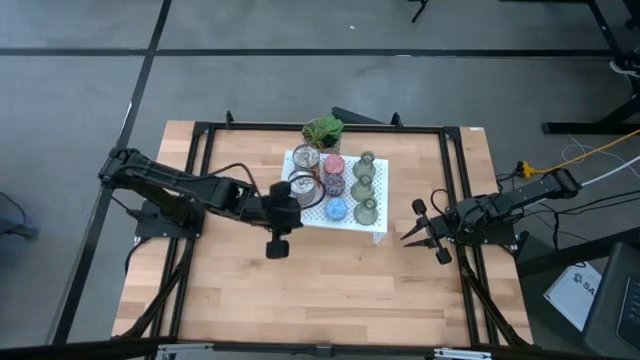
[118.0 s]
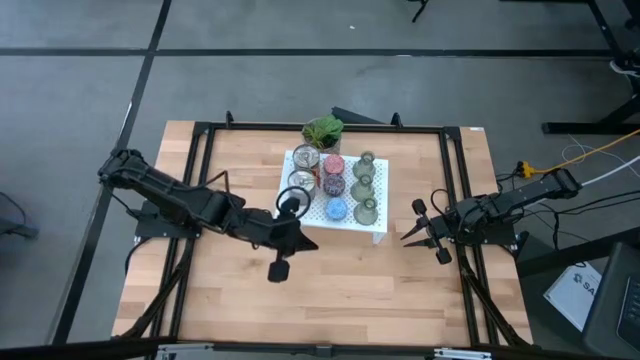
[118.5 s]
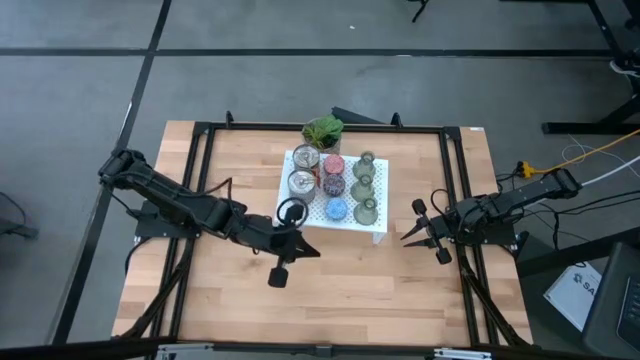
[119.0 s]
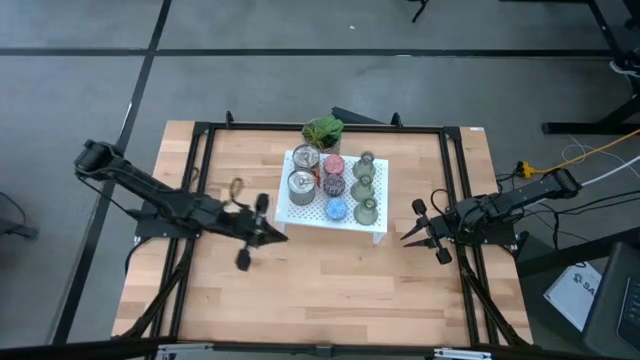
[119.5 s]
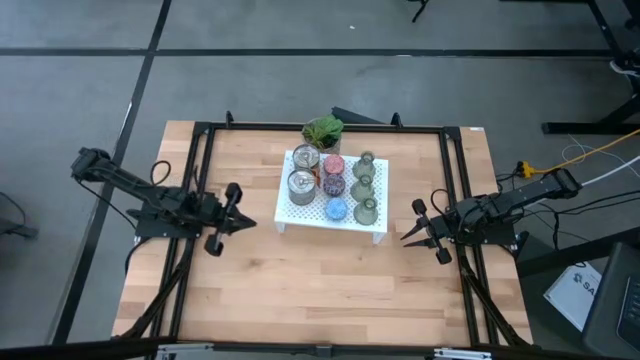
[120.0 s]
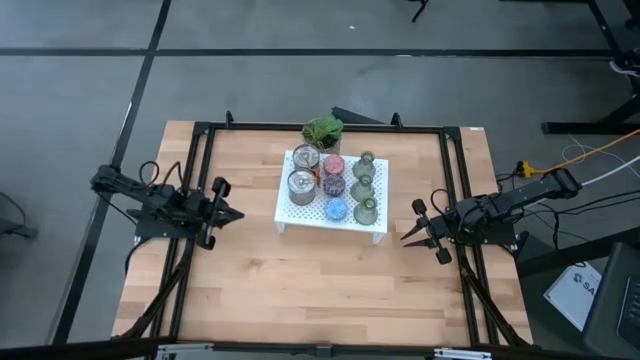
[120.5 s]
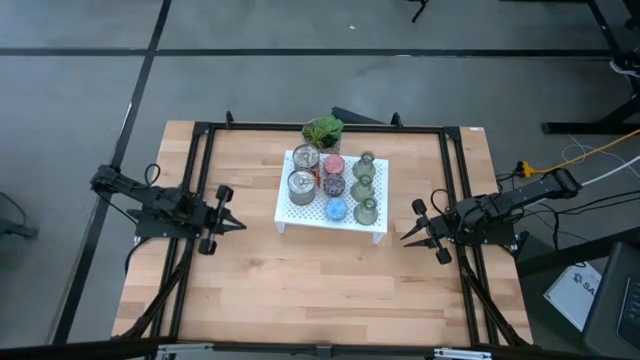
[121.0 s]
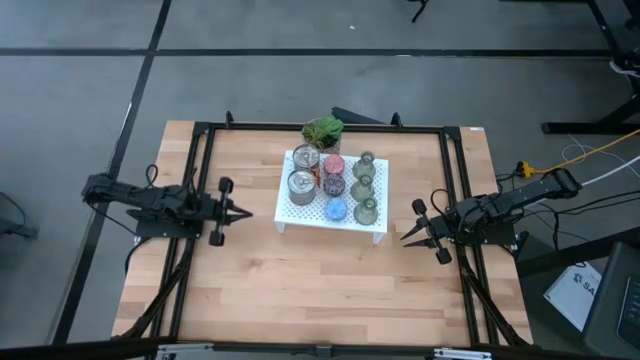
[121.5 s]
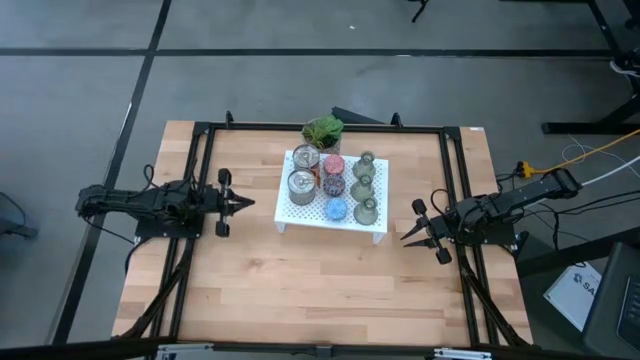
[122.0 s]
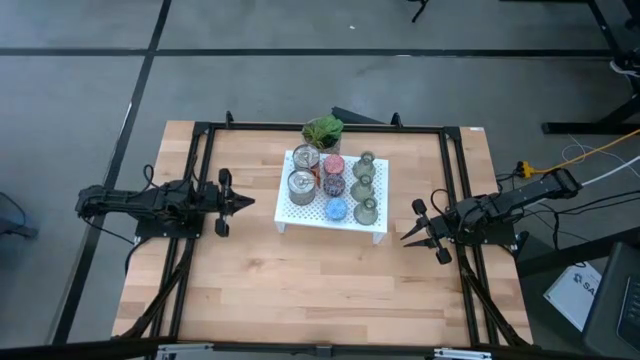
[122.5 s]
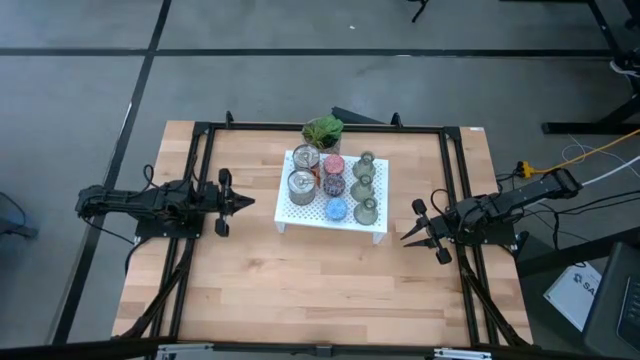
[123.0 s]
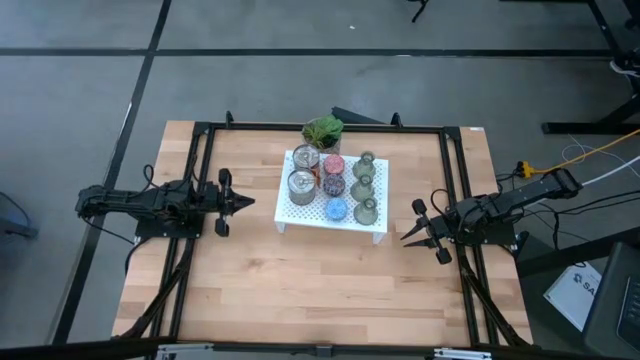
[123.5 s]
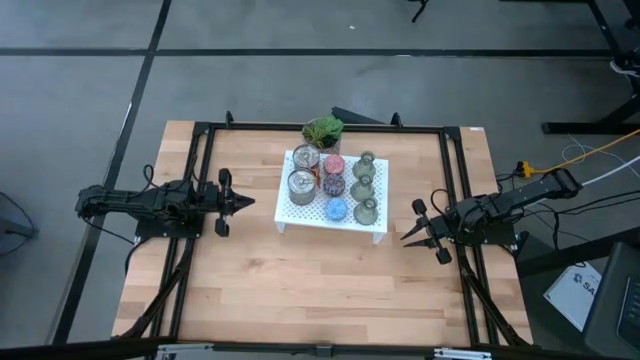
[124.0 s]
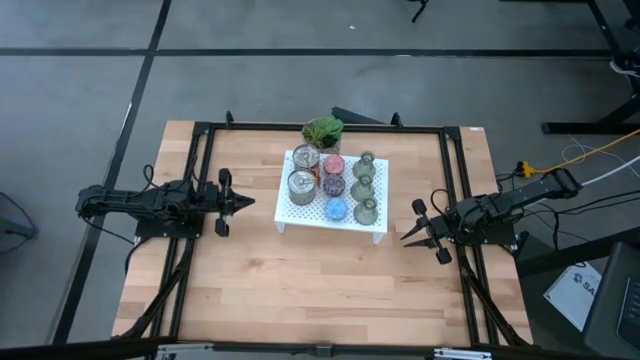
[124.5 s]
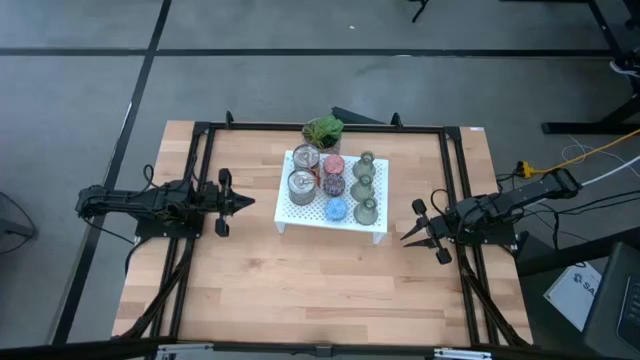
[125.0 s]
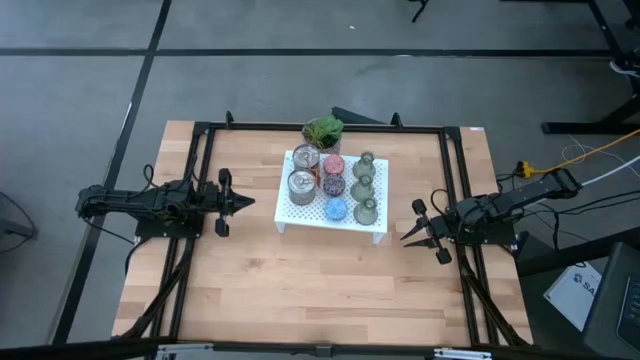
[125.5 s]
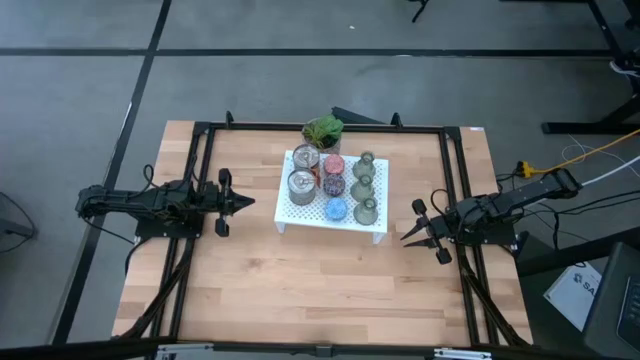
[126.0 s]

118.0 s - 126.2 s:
Task: Stock candles and vases on shelf
Return to Home Position

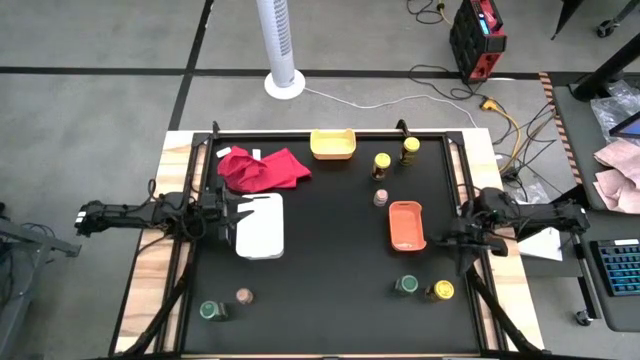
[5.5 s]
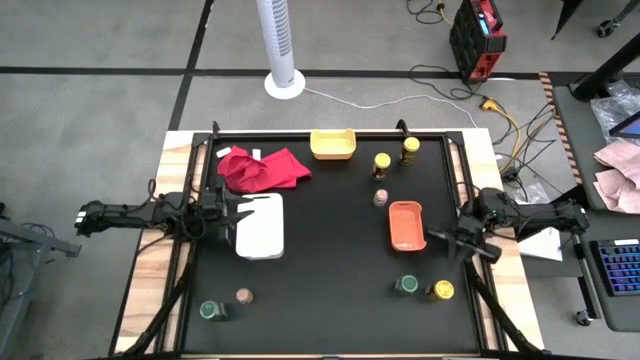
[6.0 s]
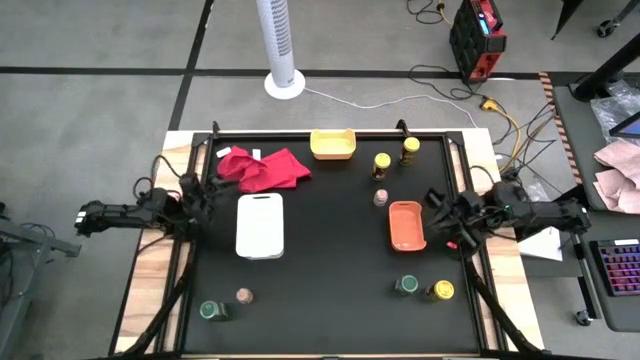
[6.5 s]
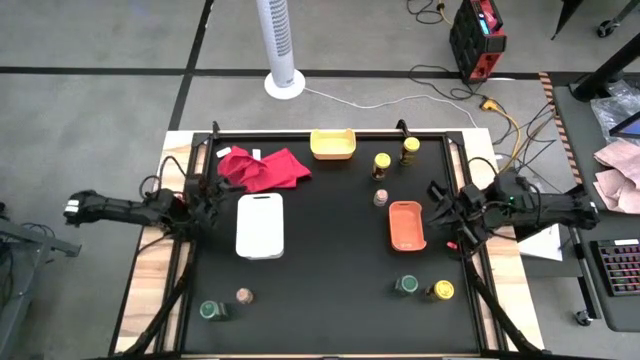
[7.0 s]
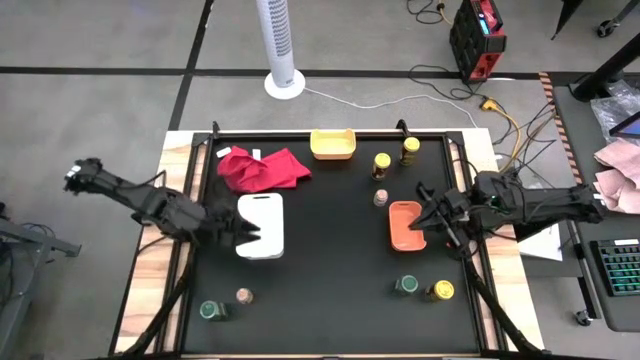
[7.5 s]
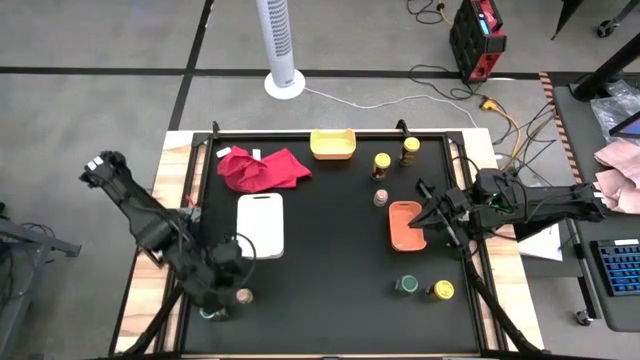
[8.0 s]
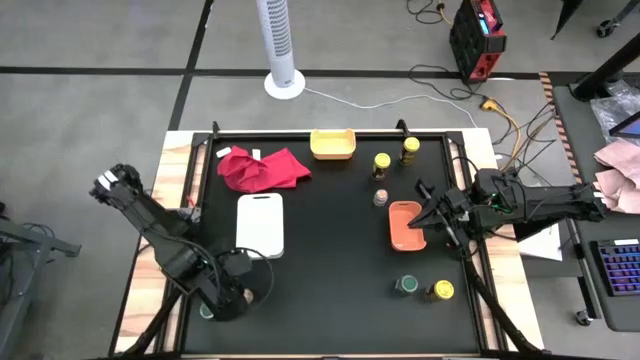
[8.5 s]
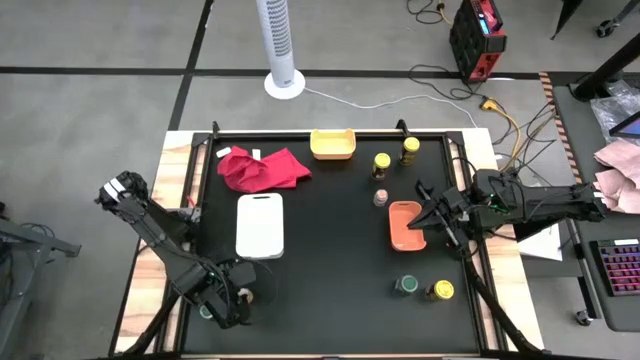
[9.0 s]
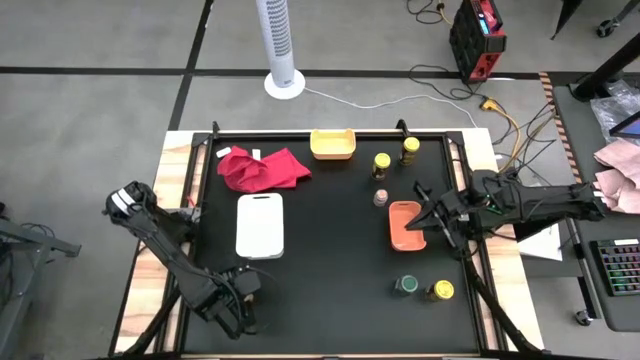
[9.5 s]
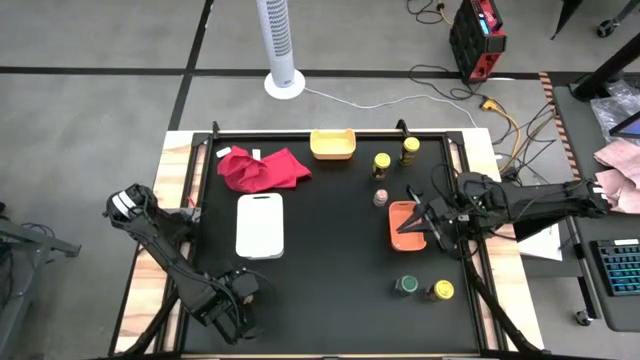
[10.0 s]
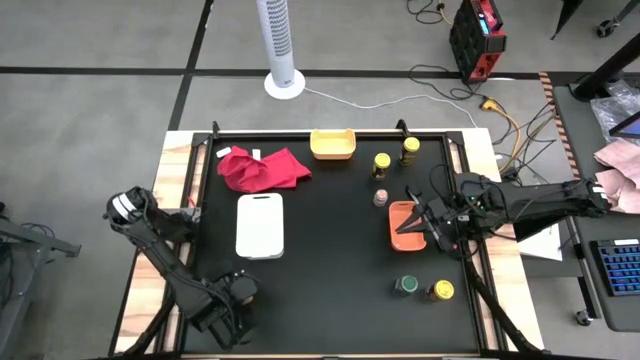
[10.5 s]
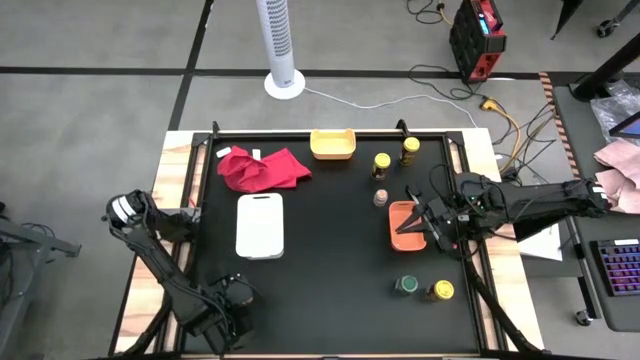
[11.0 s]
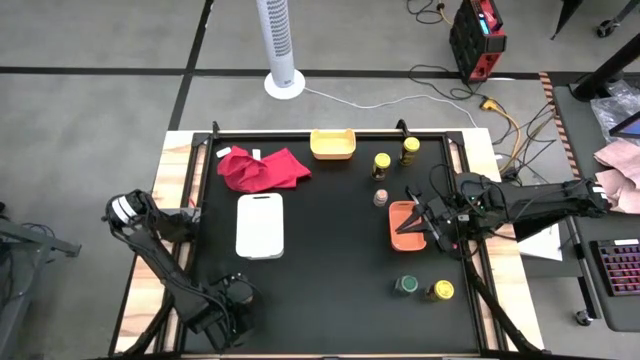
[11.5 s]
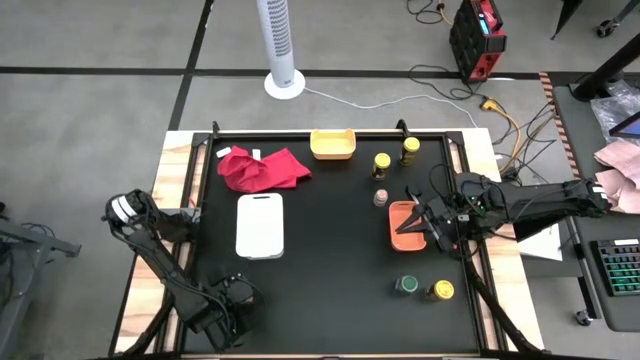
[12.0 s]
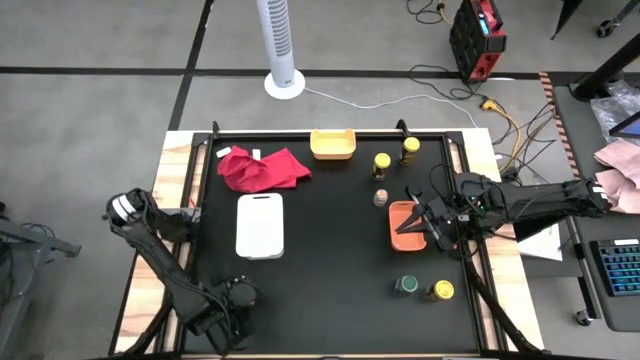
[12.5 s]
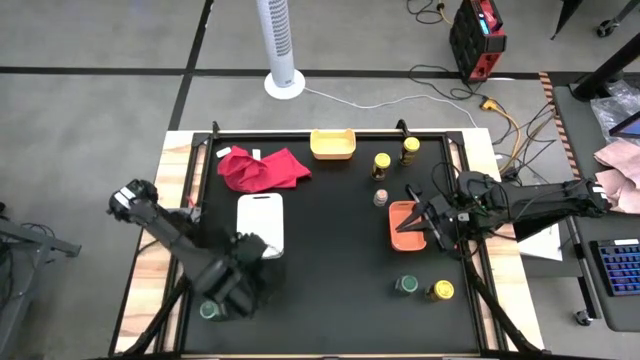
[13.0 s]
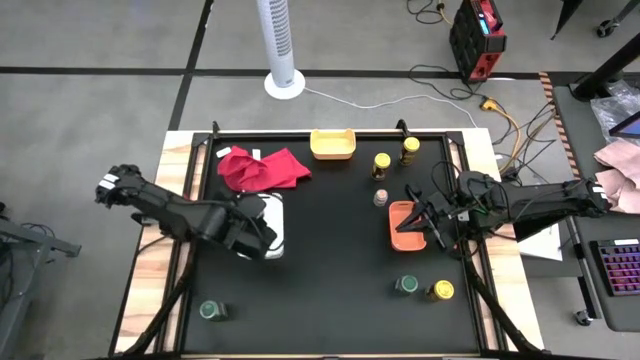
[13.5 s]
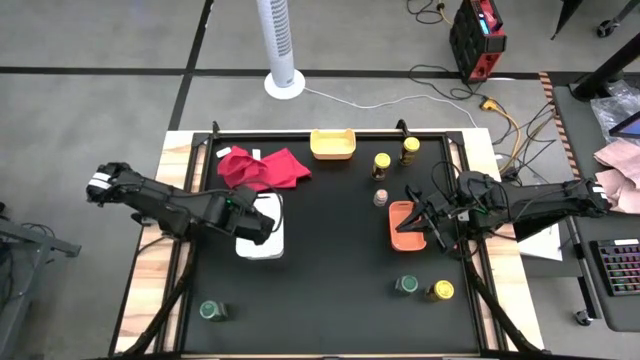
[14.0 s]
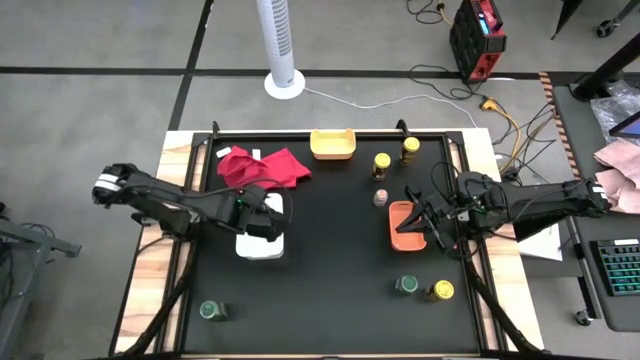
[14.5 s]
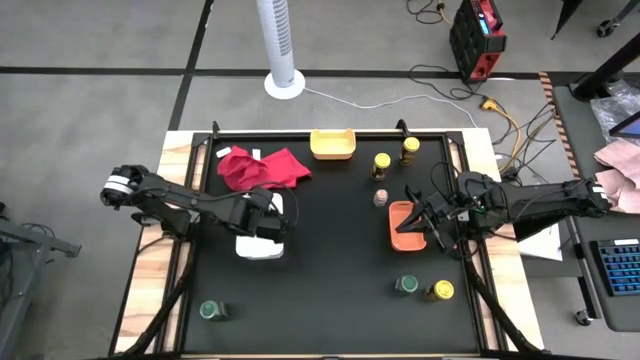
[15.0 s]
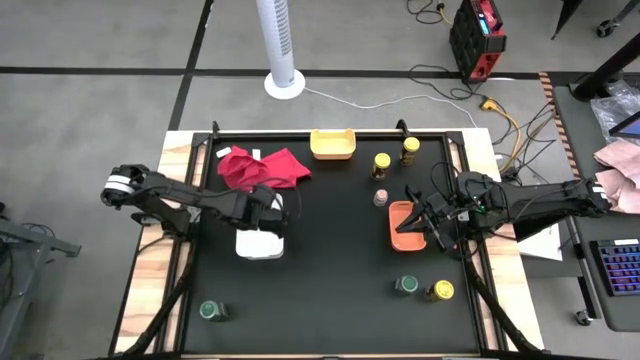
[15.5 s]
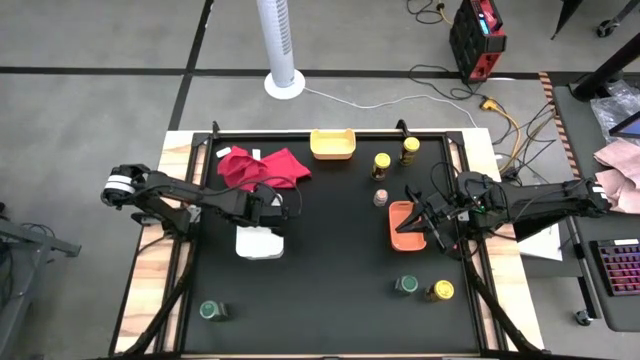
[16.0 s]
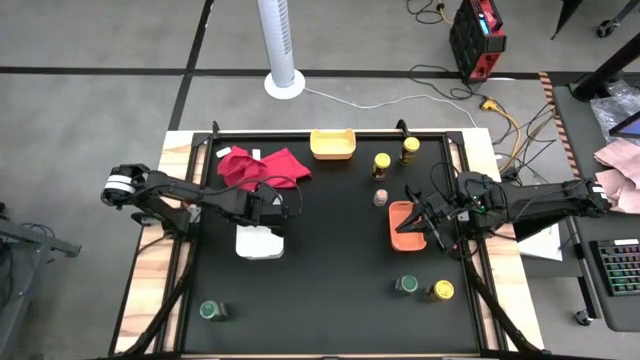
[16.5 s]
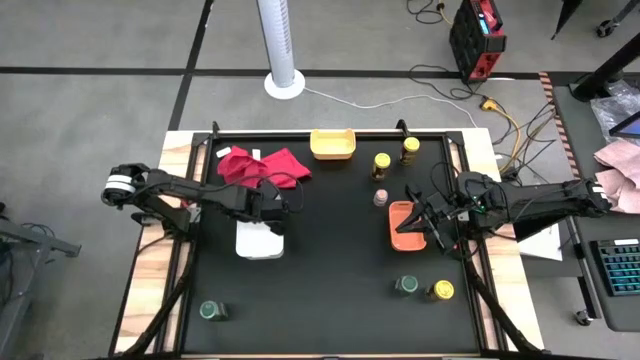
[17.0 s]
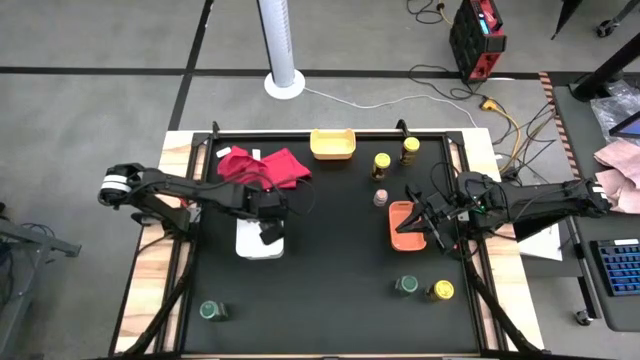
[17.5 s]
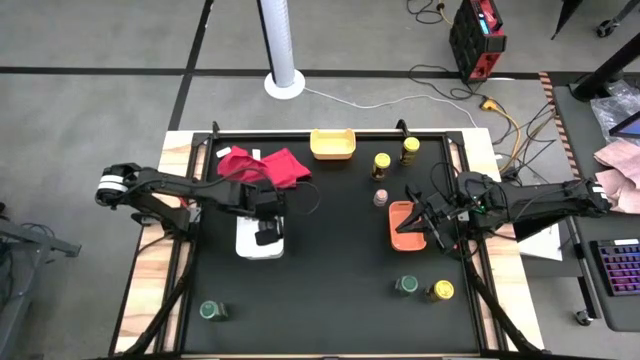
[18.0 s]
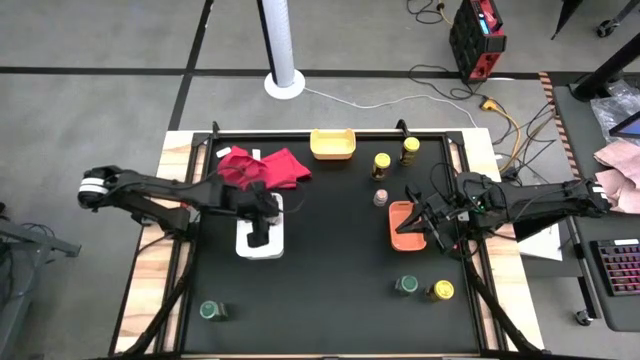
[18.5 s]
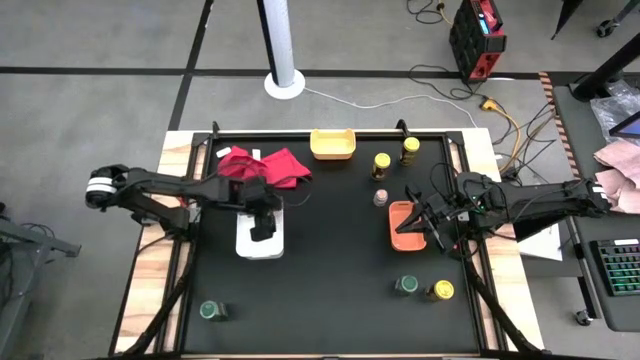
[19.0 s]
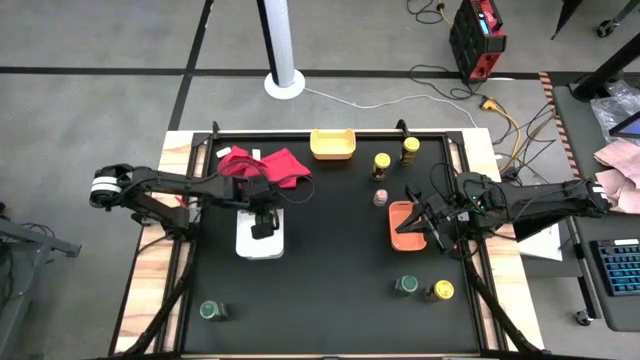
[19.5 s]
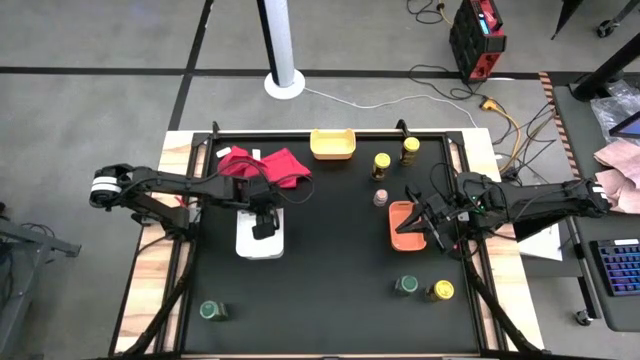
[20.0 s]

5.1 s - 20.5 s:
Task: Sort spices by type
Put the bottom transparent seasoning bottle into the white bin
